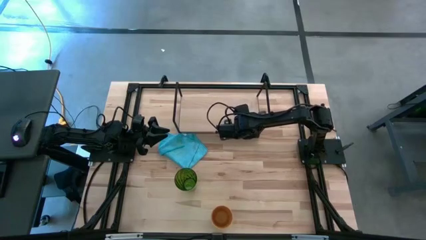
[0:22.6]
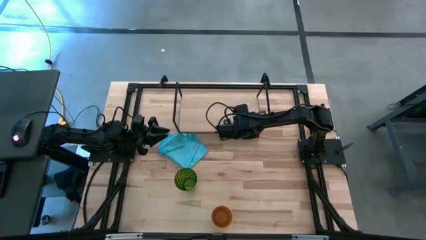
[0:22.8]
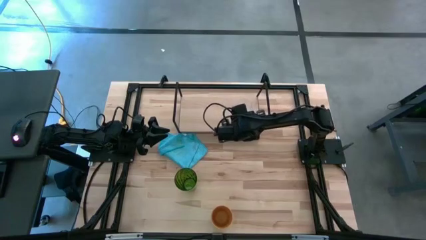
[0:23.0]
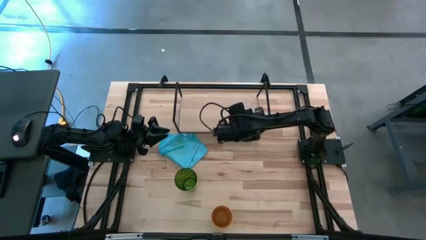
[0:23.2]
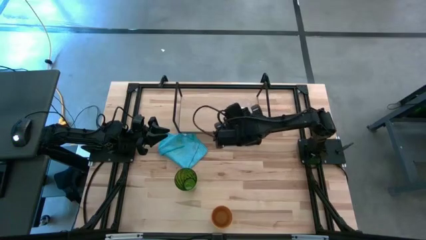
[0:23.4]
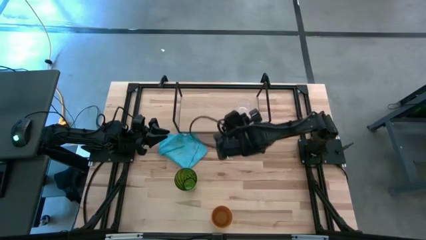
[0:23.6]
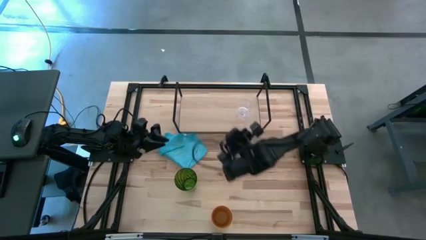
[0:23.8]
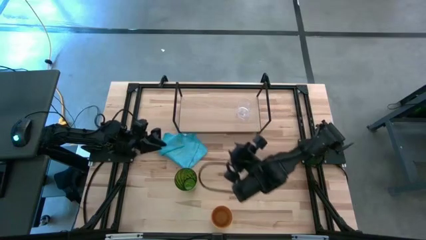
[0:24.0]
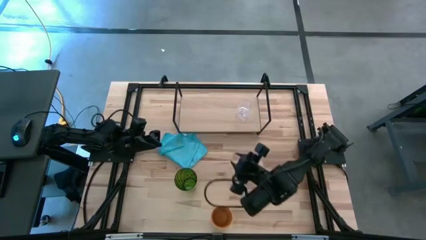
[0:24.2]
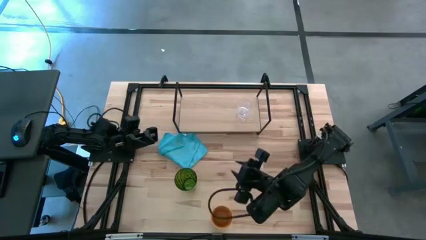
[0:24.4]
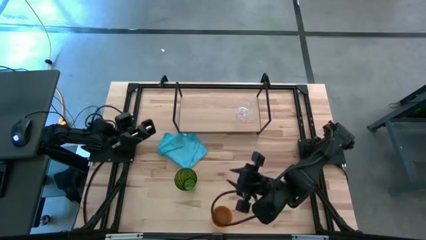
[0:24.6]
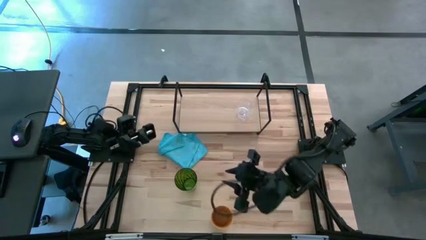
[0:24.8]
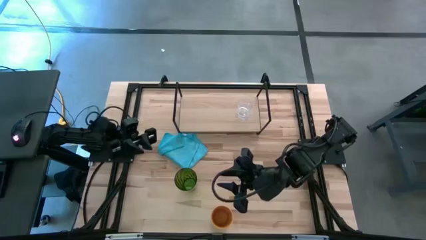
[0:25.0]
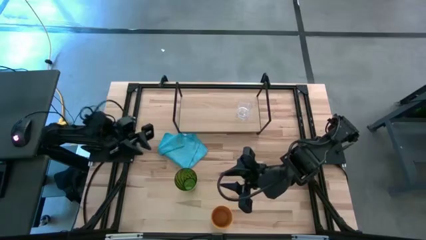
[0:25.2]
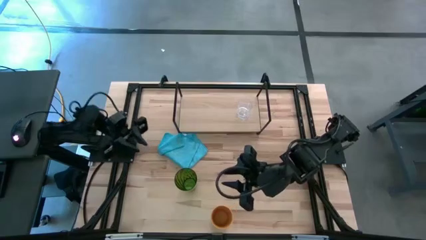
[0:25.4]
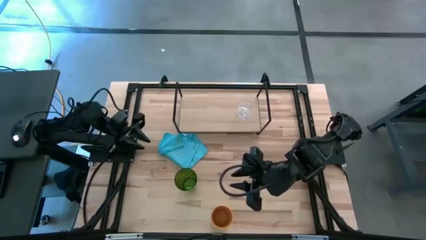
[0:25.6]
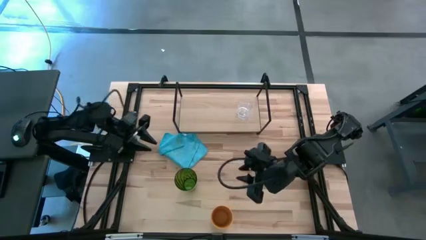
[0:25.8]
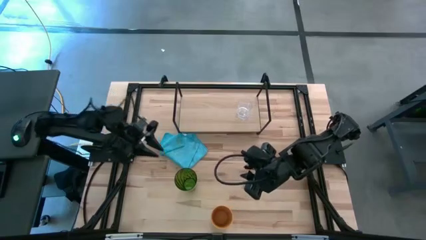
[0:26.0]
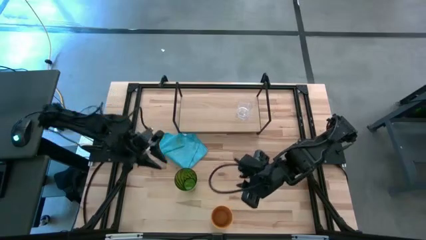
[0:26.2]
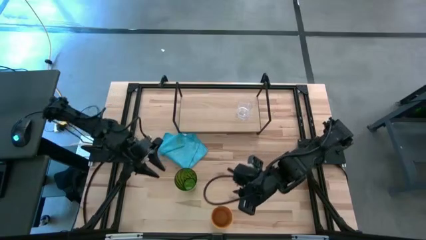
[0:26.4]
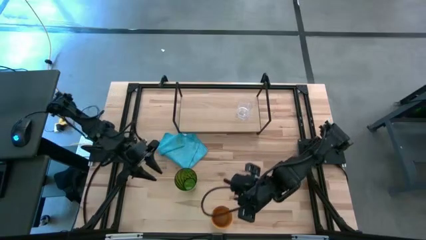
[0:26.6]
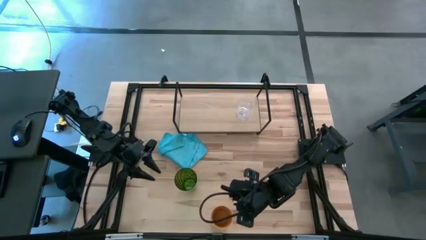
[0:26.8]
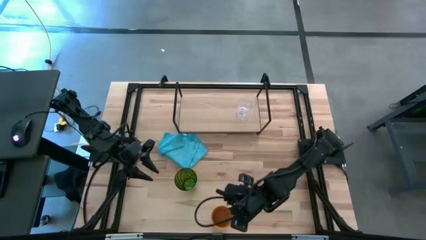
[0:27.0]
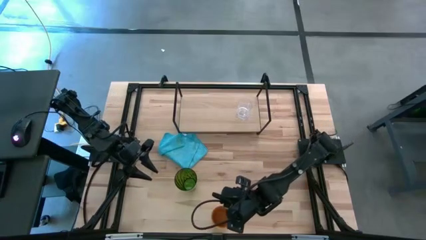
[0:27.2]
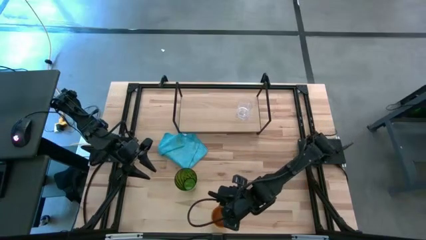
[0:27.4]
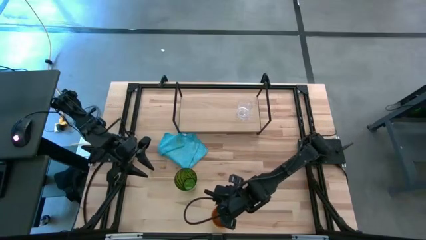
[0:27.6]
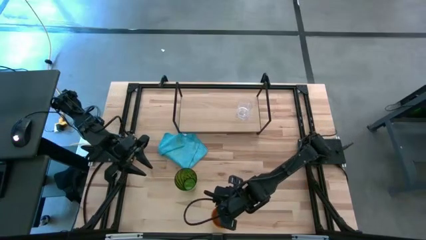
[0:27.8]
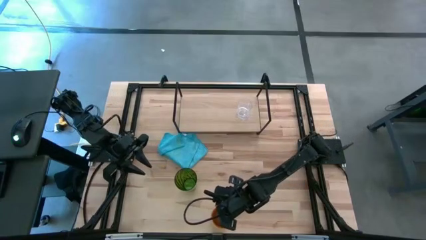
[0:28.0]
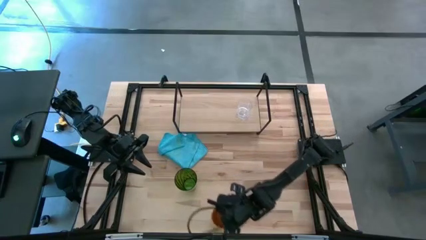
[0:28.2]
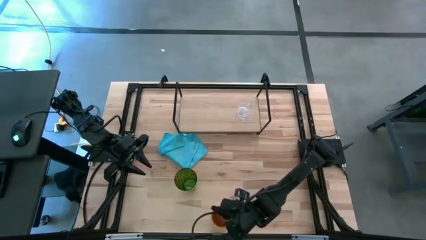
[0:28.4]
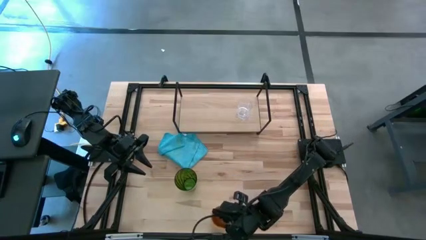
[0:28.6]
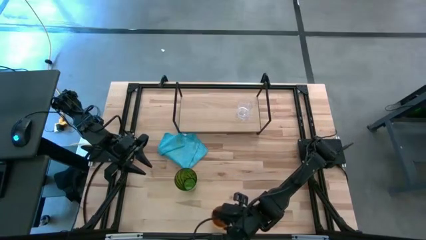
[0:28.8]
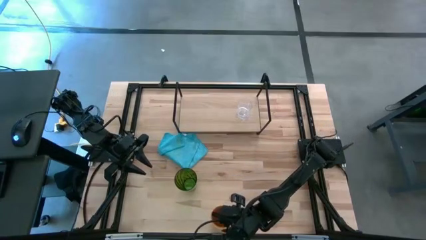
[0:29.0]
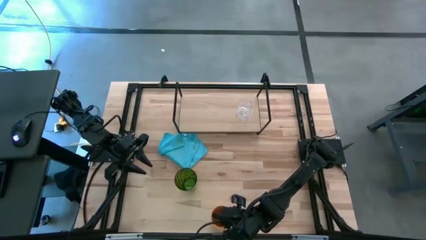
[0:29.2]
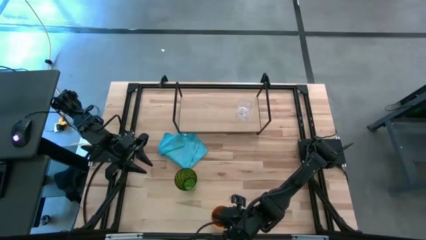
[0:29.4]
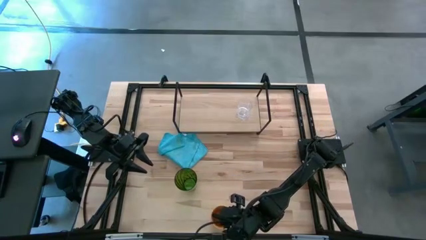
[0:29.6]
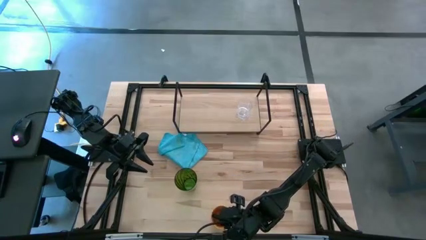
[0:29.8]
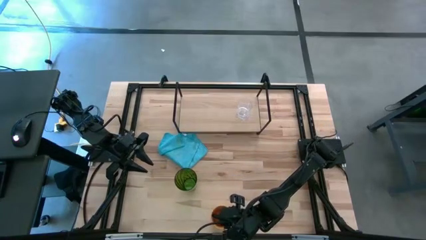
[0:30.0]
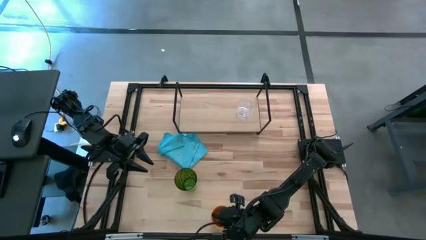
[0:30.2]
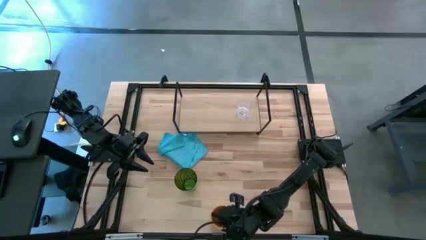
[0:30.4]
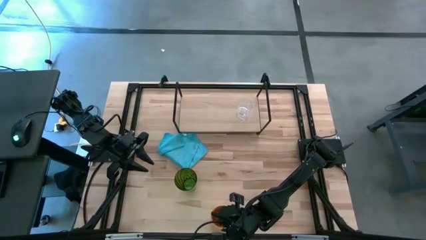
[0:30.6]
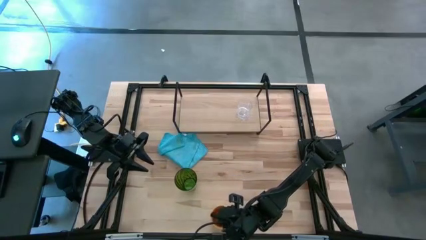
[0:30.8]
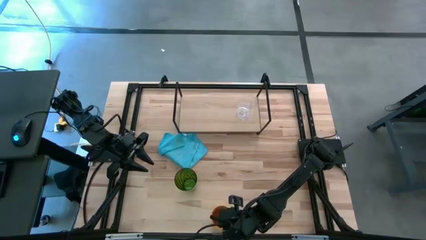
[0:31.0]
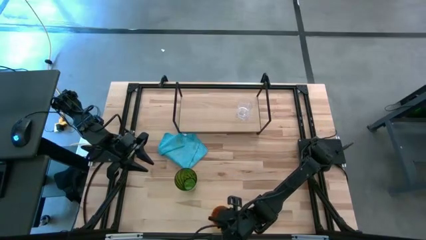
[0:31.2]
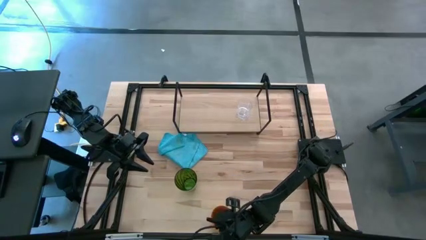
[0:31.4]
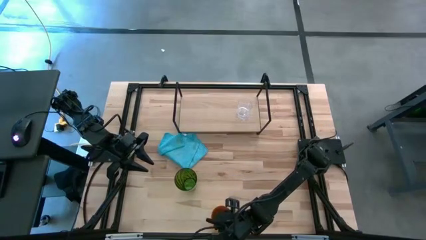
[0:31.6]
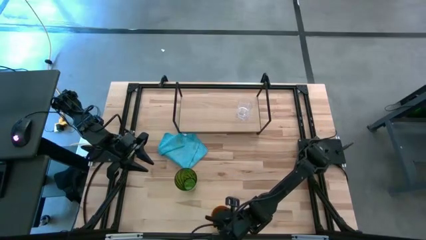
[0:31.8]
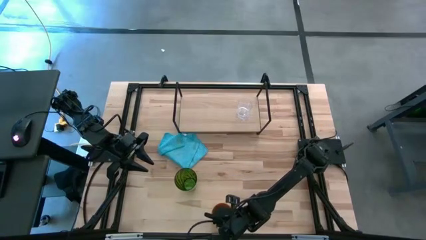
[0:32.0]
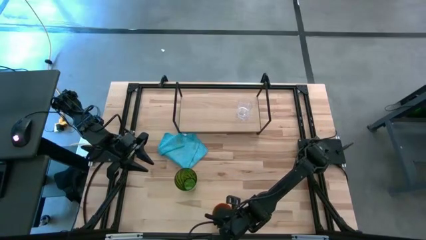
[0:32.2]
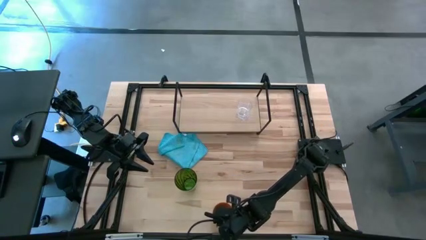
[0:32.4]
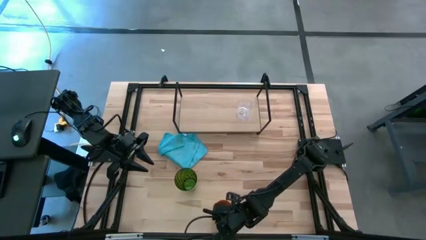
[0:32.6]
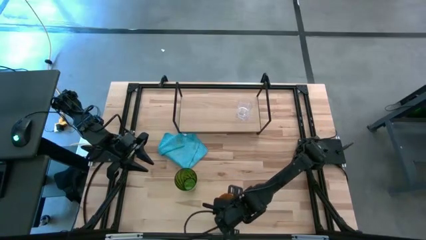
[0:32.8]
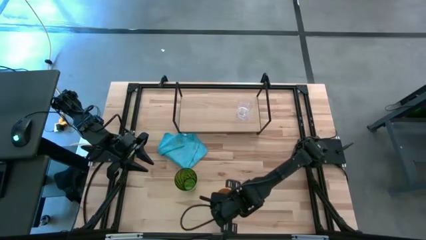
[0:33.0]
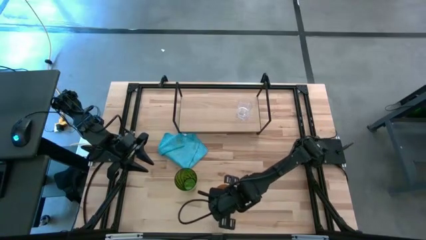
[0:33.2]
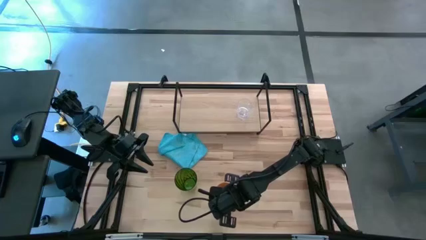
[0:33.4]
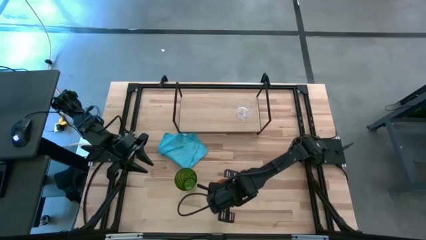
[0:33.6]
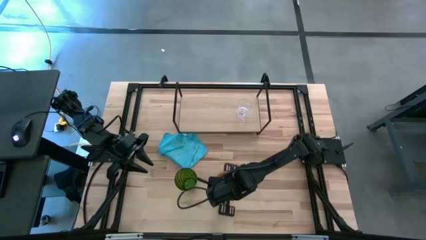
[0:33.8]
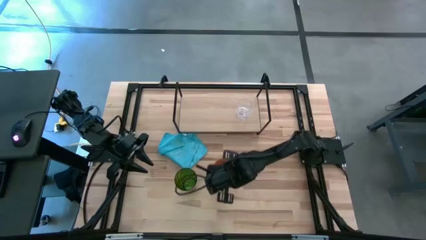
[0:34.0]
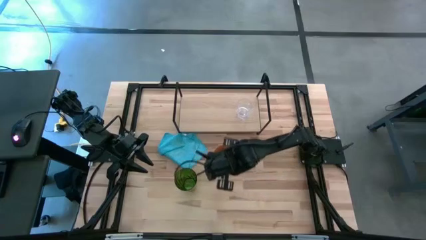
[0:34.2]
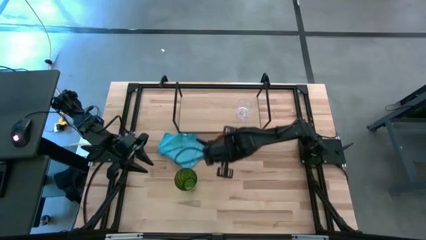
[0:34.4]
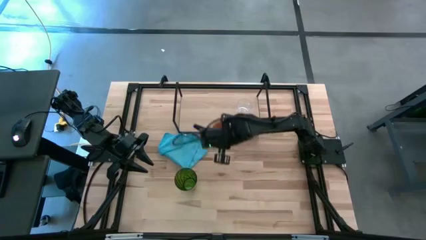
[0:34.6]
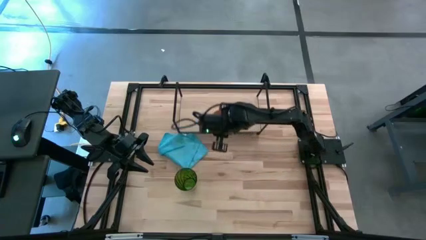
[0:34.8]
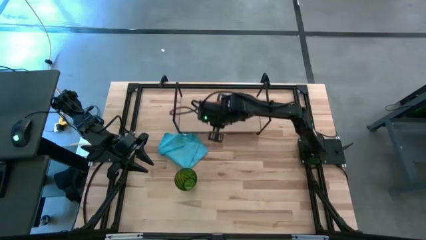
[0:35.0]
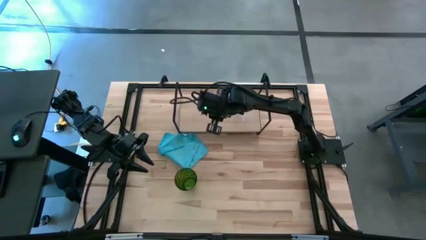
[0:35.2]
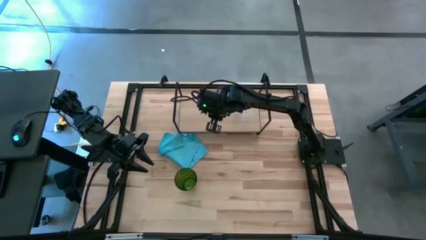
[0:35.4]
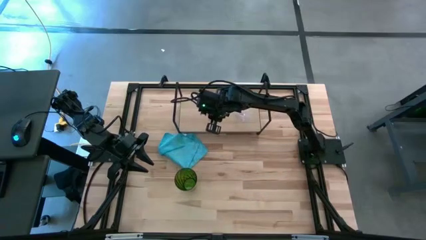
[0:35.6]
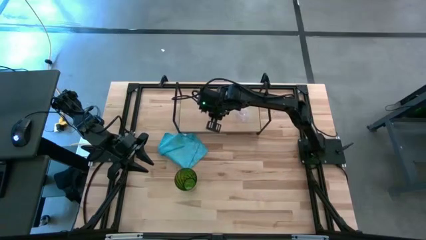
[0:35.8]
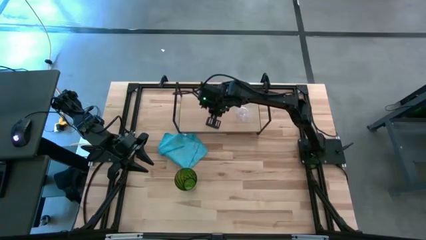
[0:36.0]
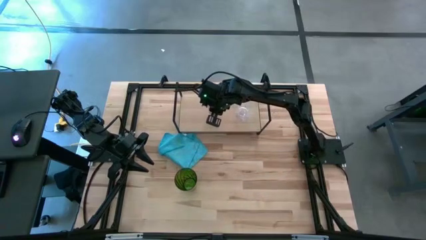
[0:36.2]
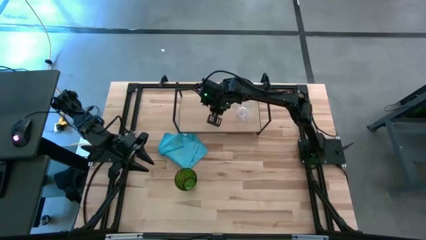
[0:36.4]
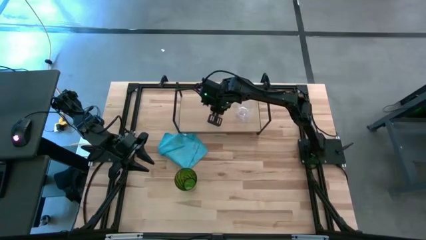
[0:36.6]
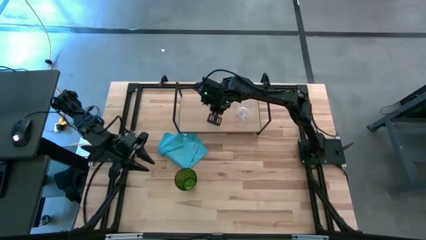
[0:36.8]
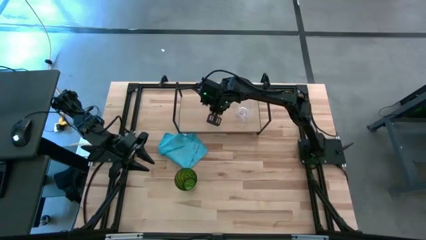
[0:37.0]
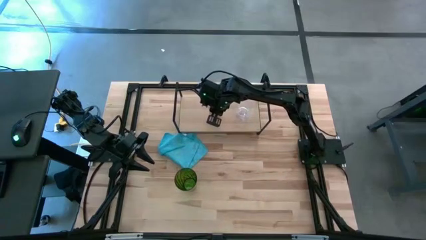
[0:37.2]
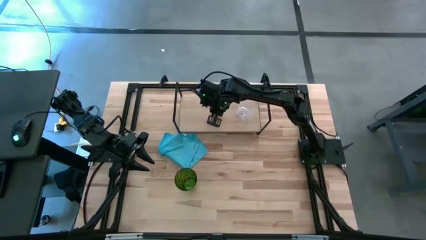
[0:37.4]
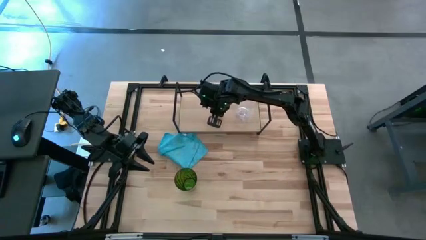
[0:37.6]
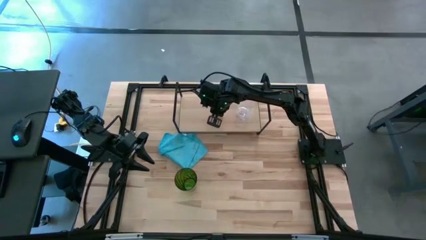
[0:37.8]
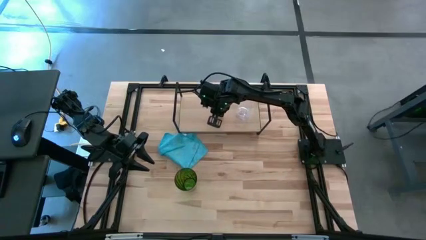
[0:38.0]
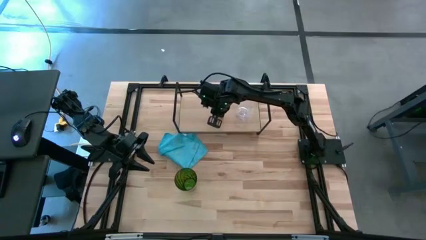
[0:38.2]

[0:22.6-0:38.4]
Task: Stack small to large cups/mugs on shelf
Put the orange cup on the shelf

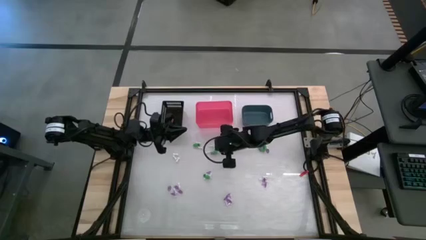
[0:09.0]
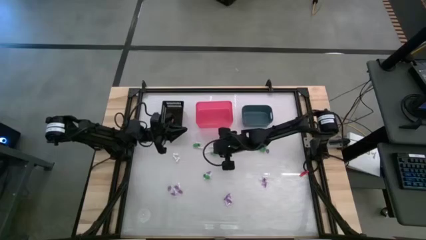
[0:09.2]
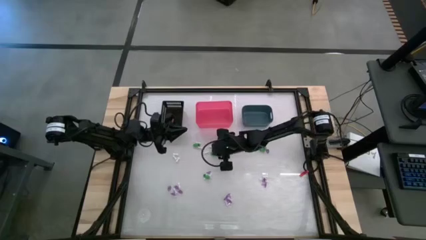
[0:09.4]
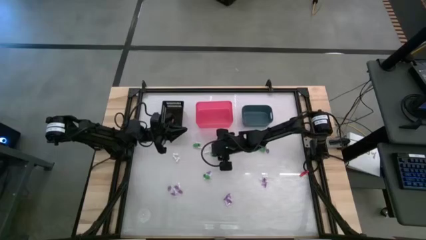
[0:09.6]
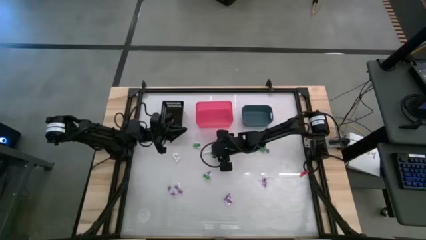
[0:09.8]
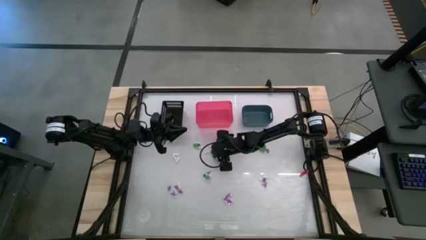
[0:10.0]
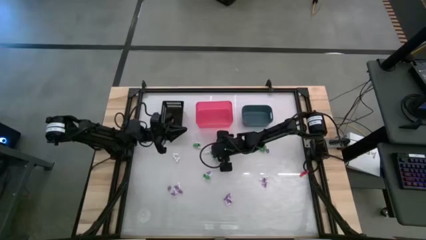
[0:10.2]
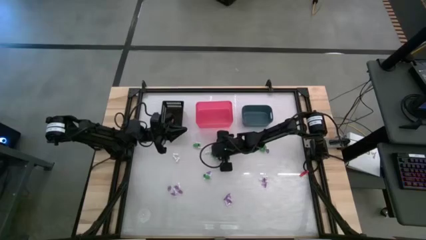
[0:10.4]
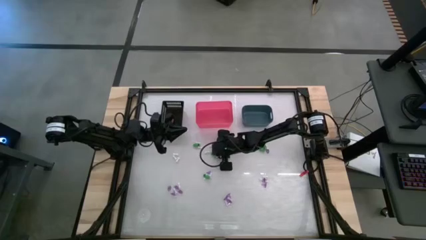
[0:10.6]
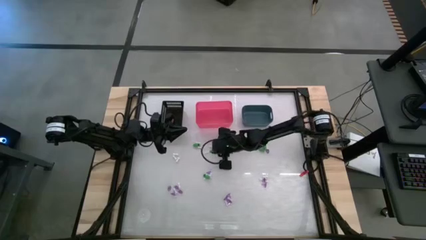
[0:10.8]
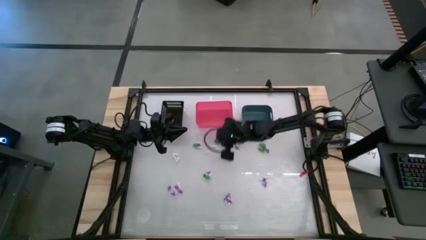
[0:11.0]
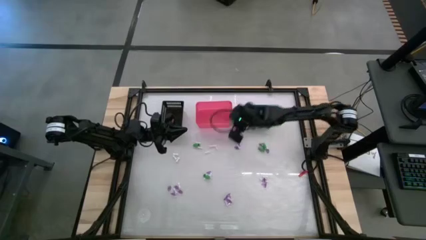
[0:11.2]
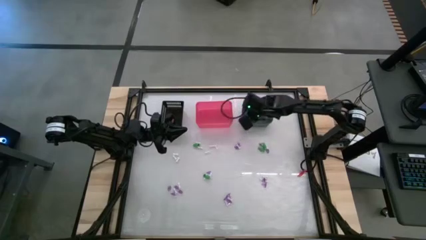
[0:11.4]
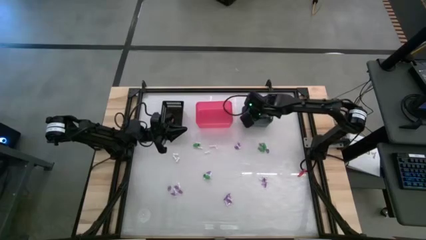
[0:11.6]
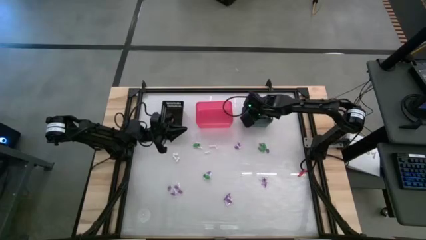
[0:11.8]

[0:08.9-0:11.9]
Task: Sort Halloween decoration
Put the green skeleton toy into the blue bin
